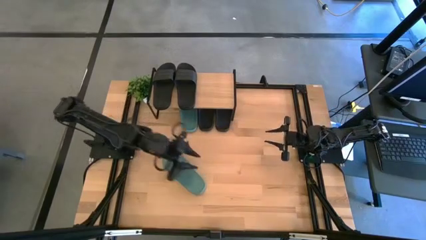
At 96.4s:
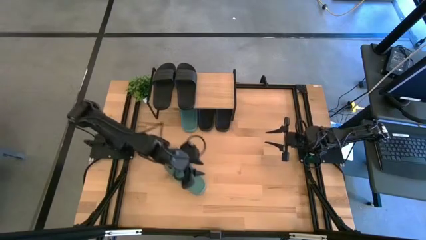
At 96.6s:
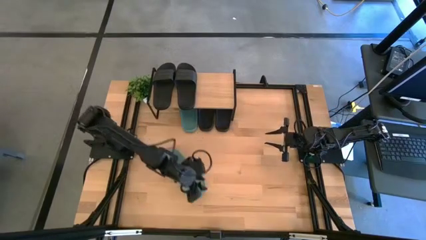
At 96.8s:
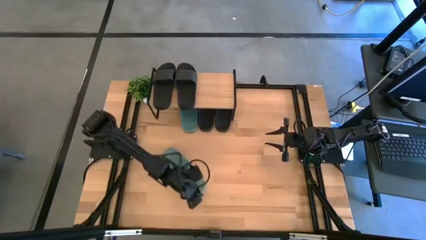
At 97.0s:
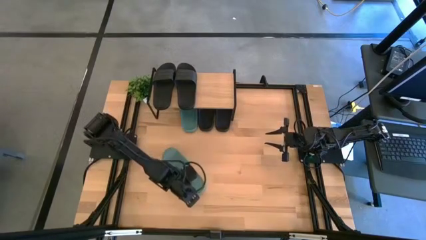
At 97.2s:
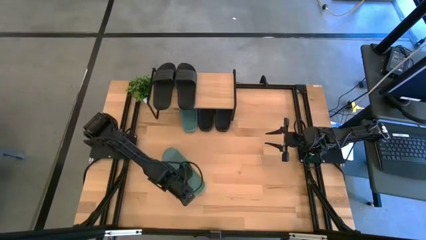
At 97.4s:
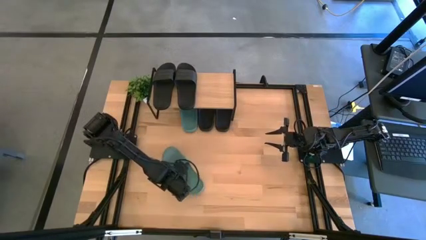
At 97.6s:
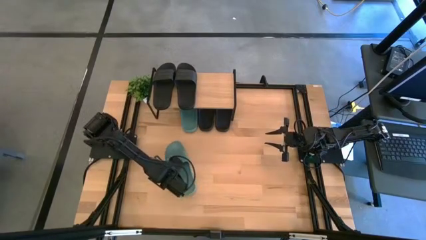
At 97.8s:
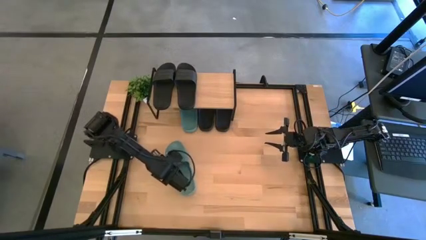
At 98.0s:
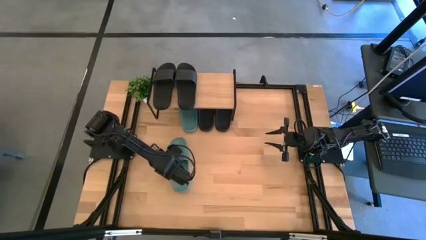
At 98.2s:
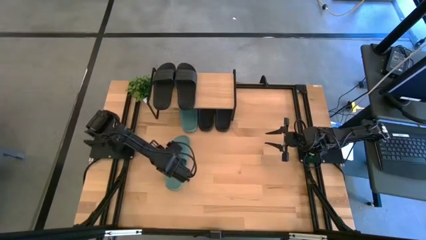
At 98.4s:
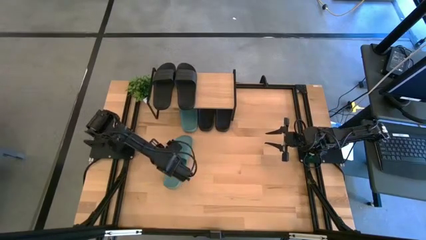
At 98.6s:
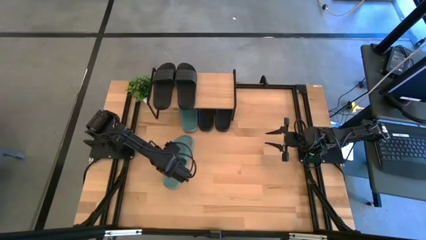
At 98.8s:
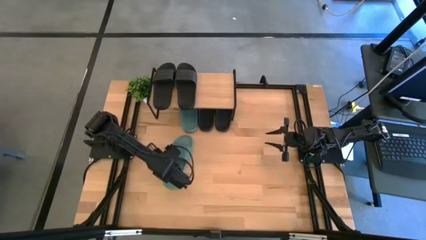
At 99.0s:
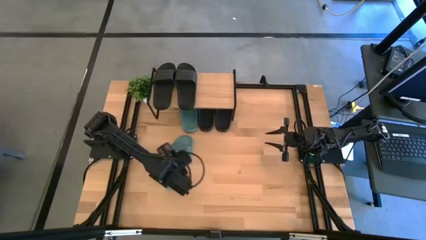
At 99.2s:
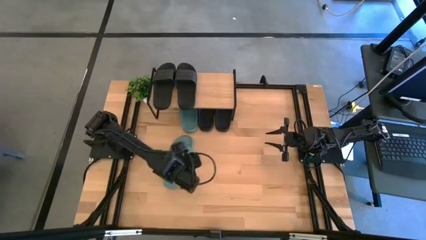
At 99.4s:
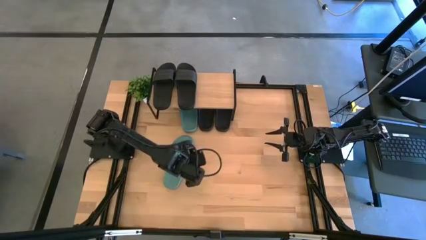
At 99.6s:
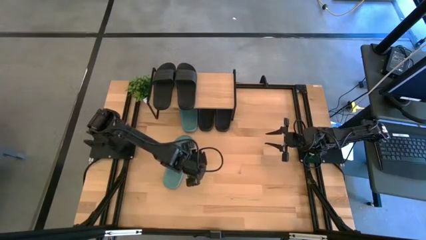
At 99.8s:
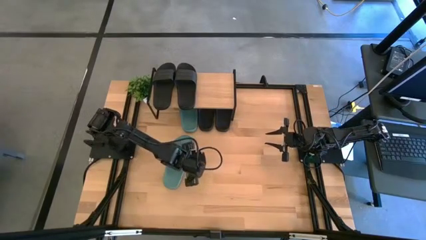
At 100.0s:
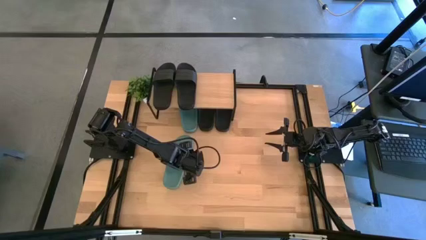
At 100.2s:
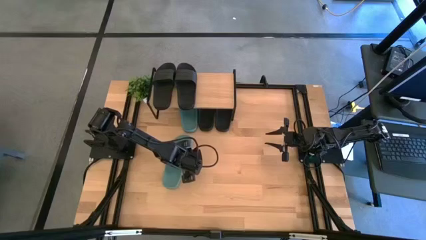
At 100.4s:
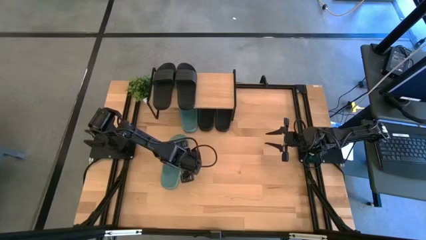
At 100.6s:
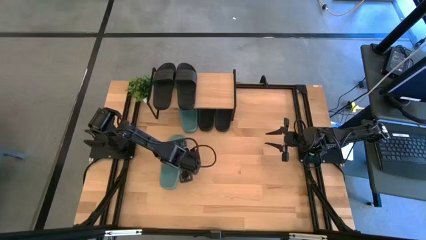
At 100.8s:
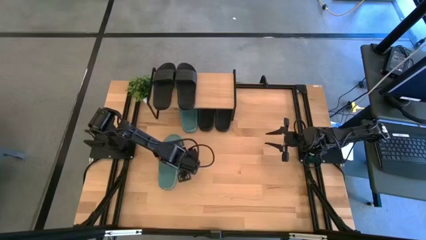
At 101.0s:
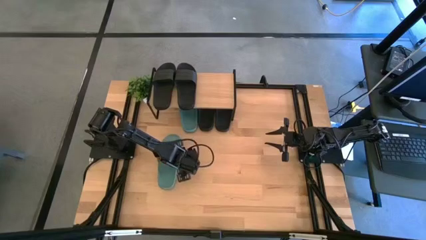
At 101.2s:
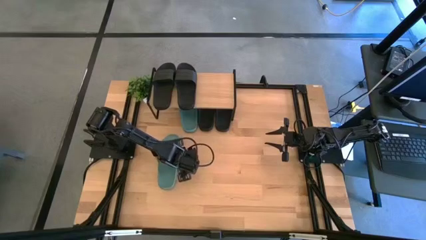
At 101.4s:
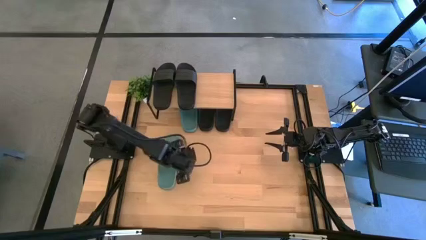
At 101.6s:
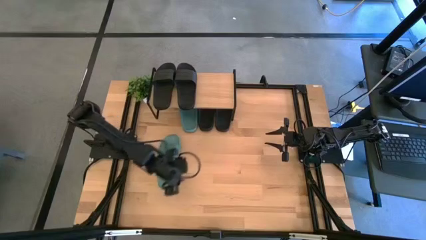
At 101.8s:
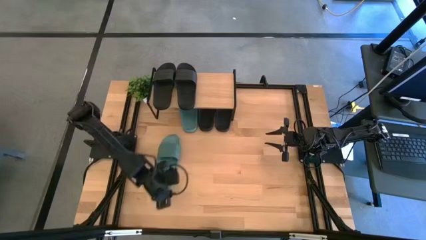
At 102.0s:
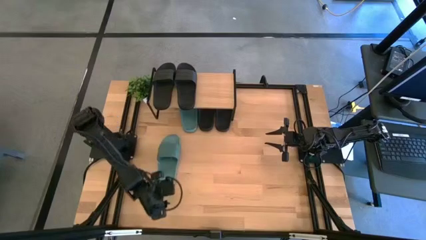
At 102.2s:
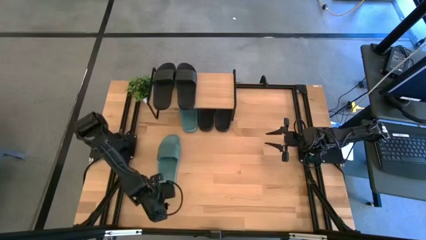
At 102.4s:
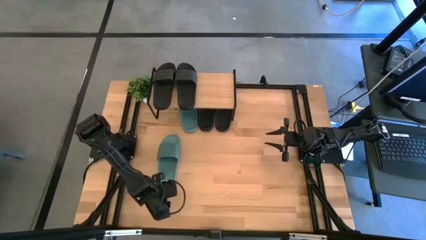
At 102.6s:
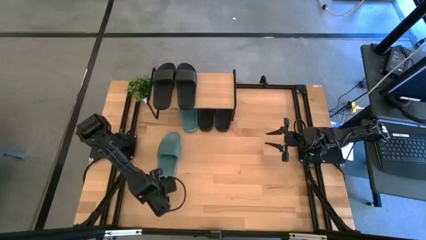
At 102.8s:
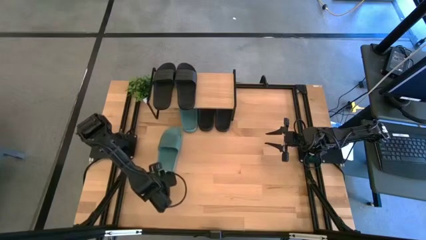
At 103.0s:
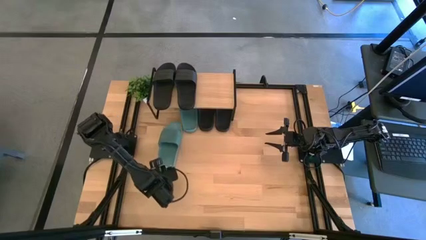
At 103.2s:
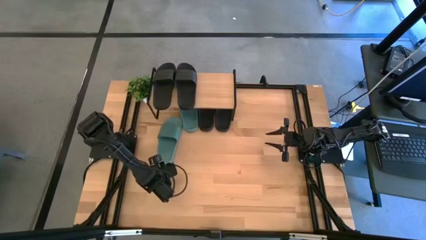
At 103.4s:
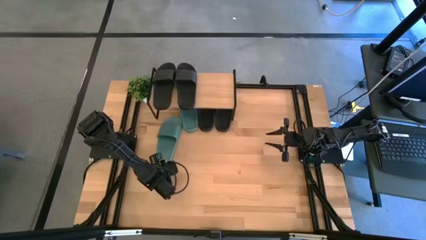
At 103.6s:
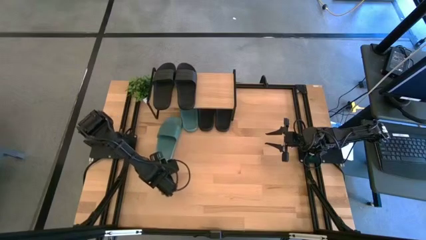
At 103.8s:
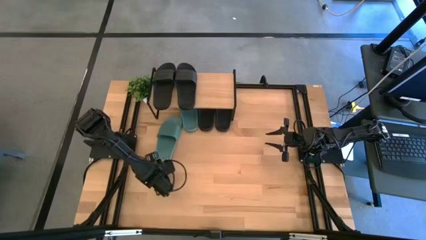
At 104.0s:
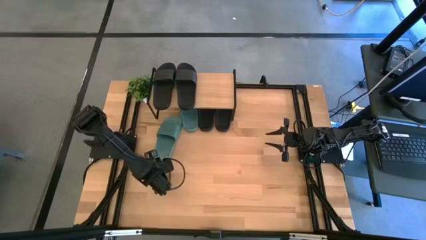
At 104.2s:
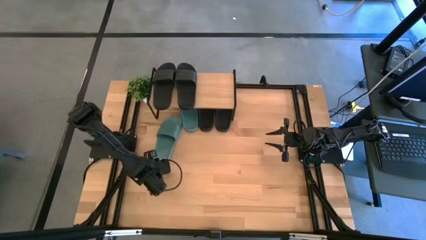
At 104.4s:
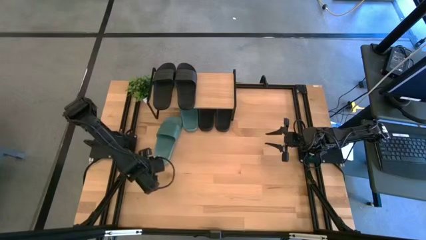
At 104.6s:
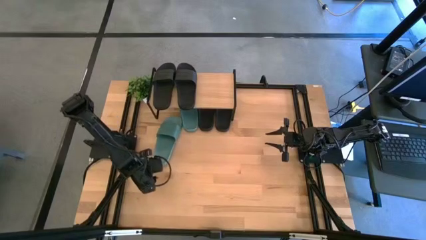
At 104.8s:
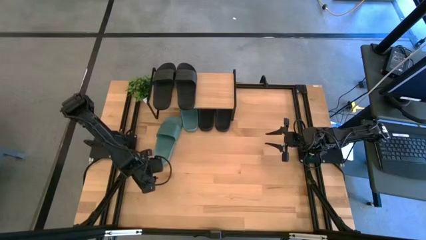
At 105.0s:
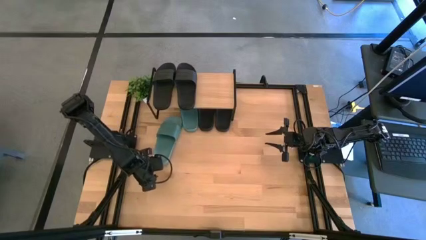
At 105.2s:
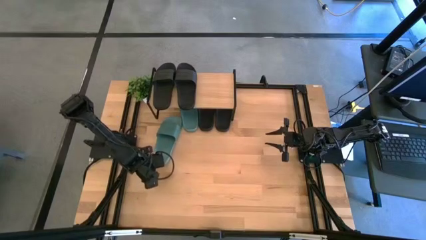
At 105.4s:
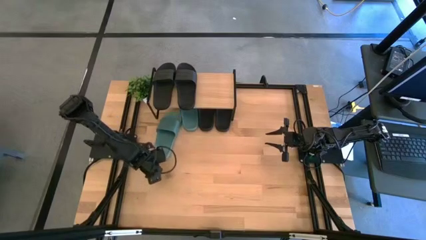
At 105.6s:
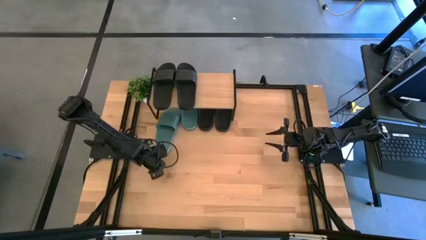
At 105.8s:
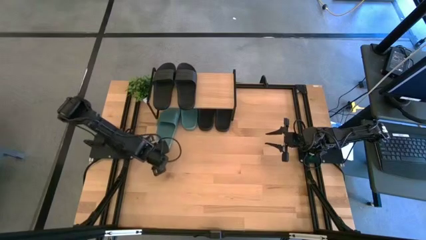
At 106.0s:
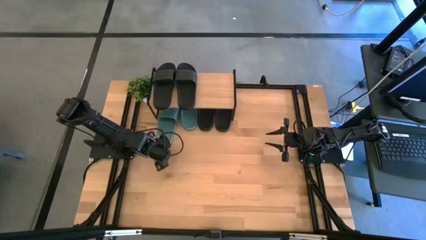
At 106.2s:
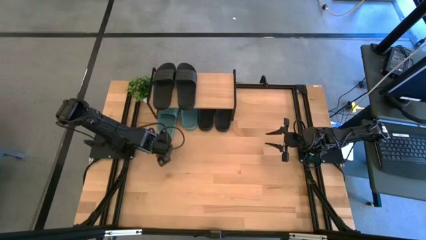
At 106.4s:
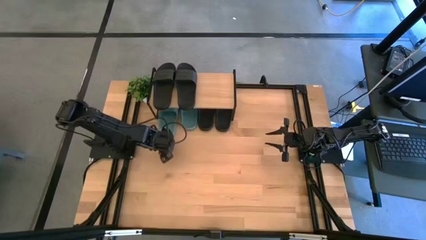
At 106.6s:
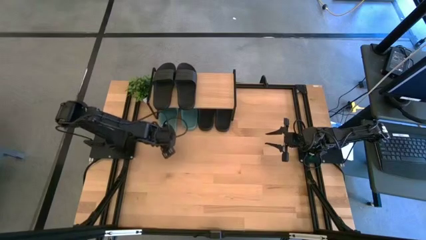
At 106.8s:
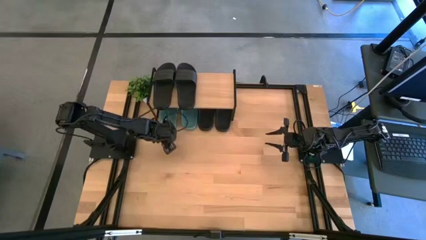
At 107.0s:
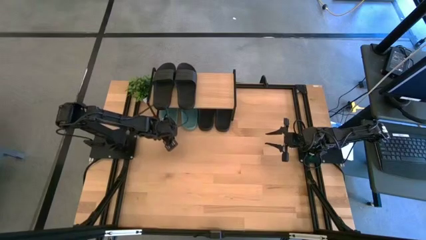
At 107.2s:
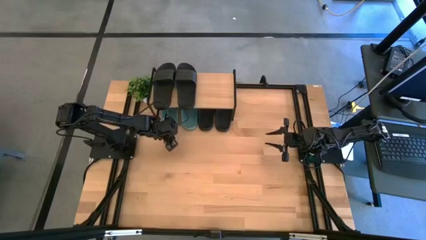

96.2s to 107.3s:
Task: Pick and place slides into the shelf
Put the blue slipper under the shelf

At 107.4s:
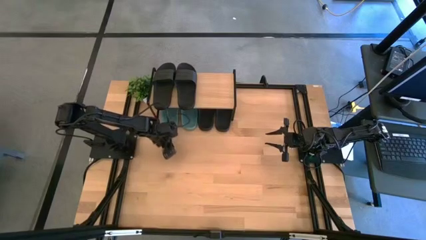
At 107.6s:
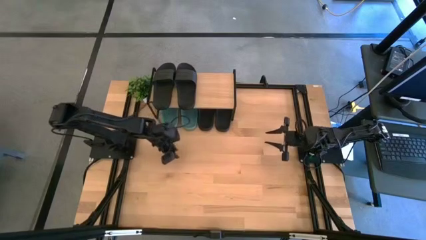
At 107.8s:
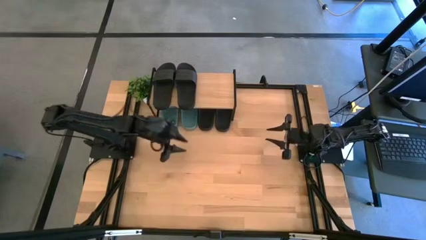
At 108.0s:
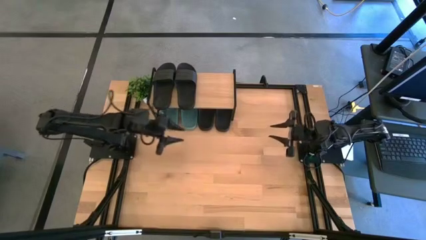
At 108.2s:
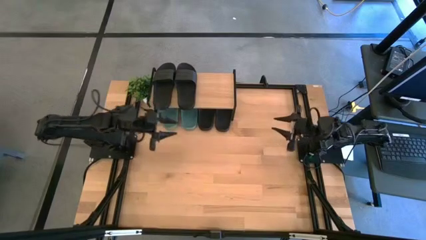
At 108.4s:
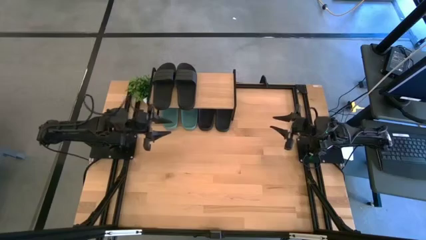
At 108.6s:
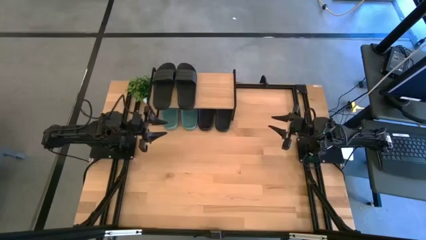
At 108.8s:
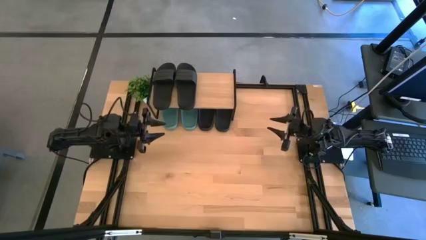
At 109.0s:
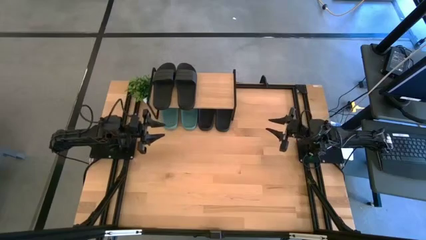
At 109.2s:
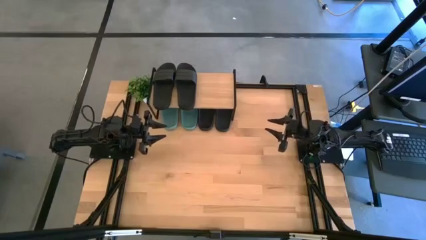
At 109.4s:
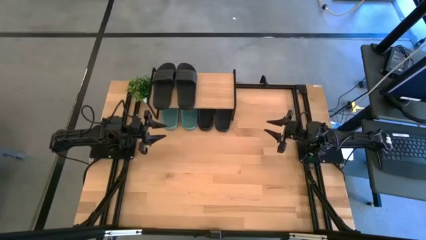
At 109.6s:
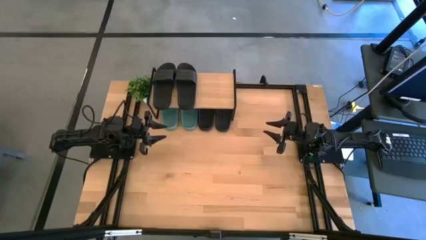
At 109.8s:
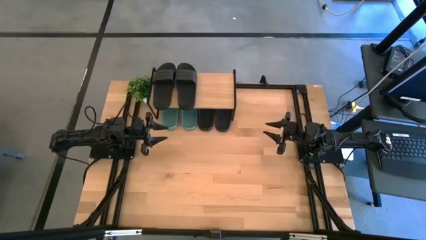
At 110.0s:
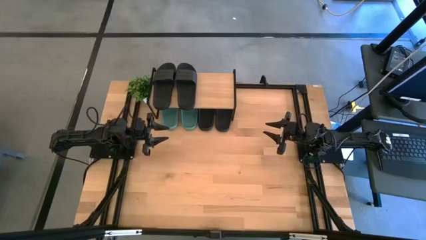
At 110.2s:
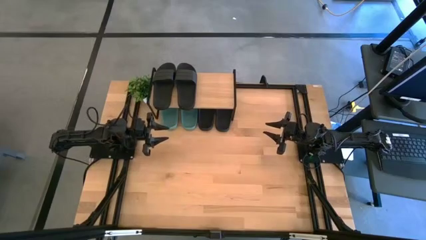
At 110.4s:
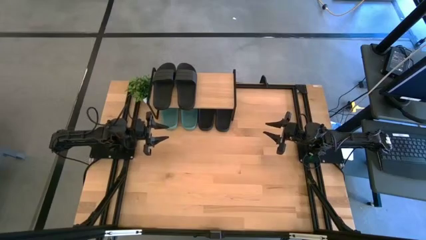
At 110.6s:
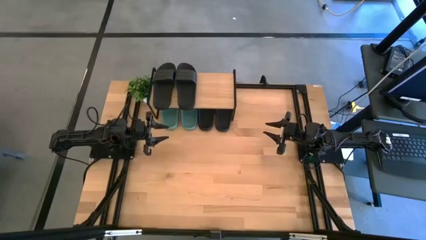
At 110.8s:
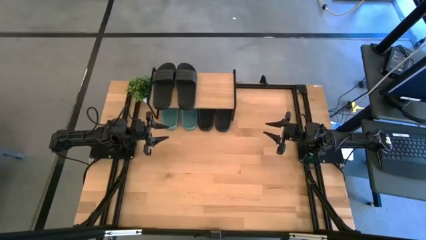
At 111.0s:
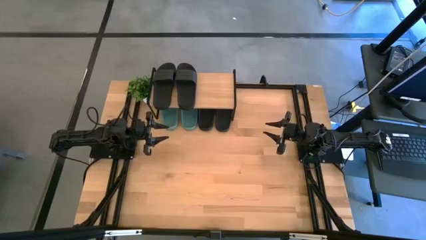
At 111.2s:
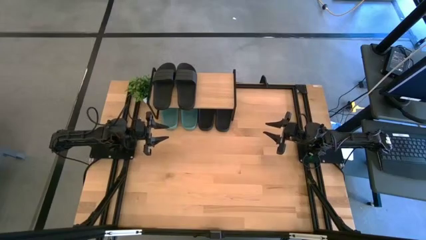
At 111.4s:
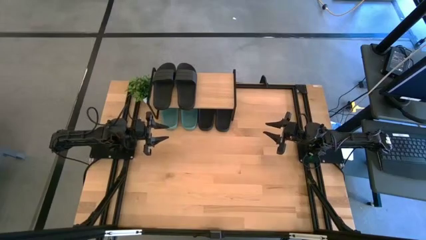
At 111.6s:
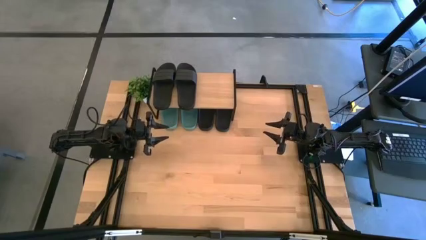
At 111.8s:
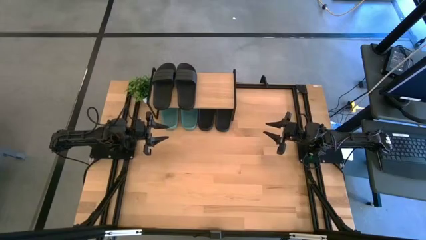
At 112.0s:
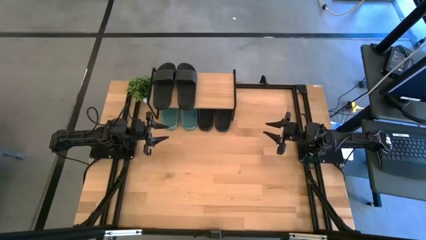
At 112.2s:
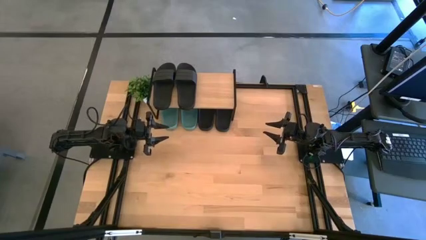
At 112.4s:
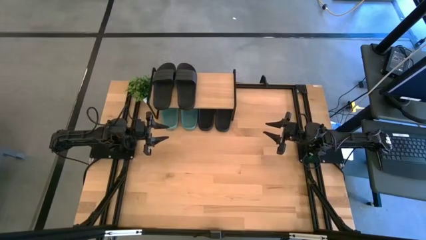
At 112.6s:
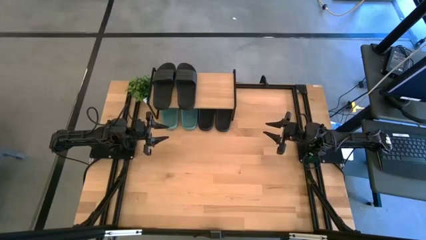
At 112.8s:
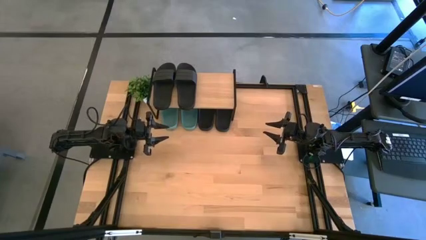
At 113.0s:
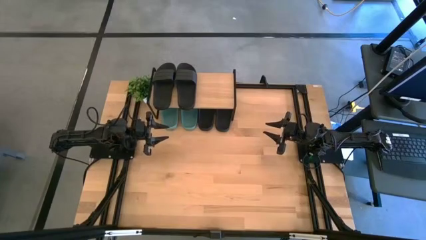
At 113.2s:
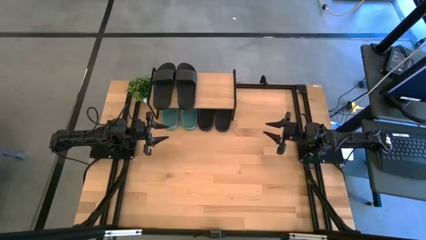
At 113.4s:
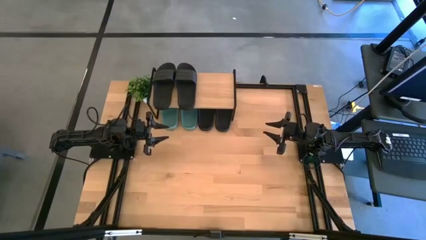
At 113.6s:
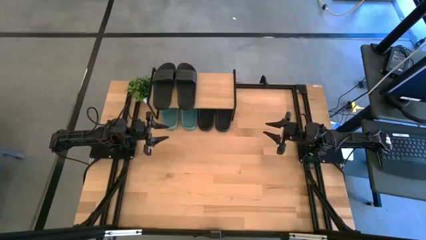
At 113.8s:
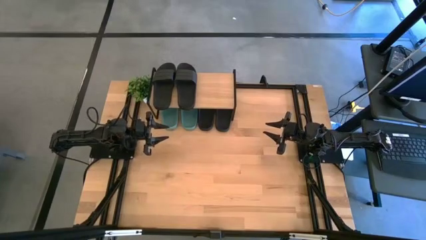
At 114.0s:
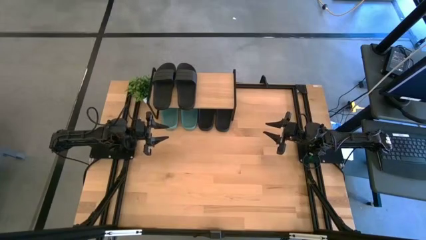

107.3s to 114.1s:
Return to Home Position
